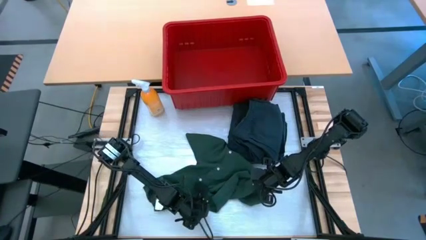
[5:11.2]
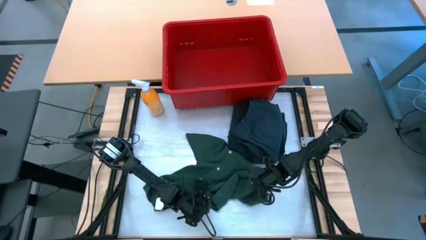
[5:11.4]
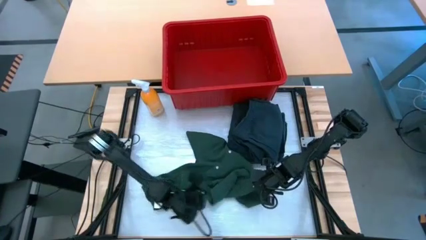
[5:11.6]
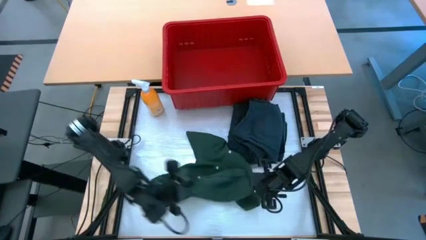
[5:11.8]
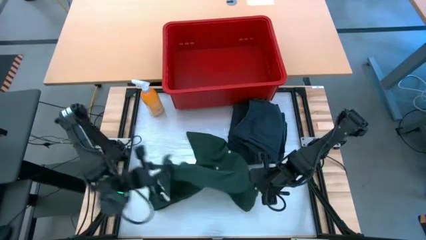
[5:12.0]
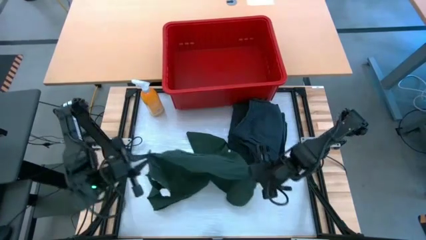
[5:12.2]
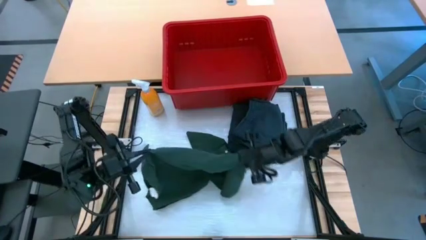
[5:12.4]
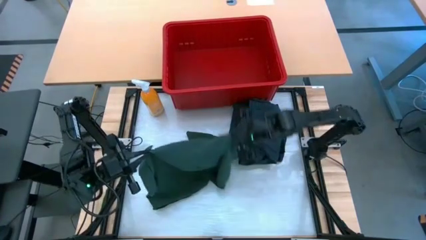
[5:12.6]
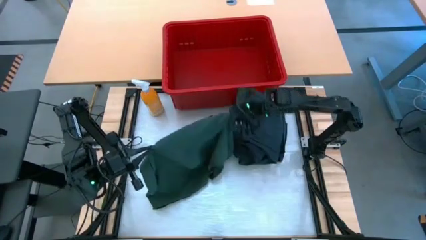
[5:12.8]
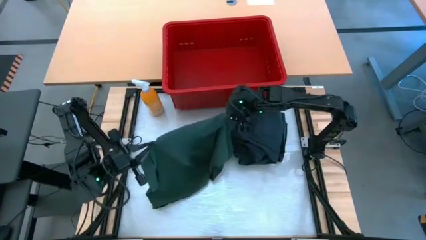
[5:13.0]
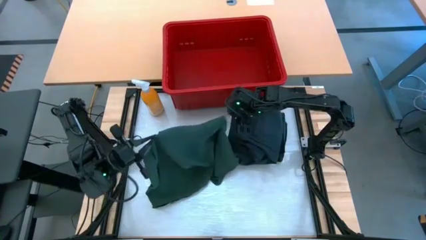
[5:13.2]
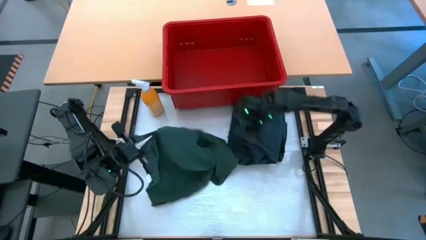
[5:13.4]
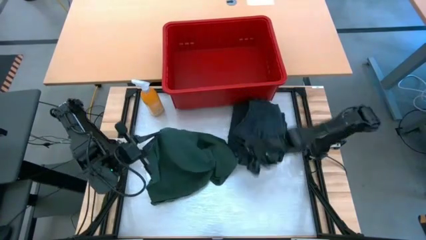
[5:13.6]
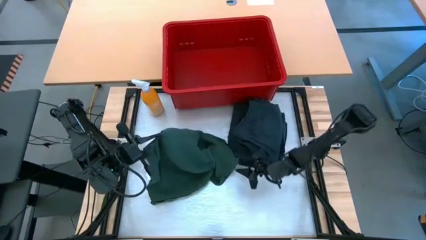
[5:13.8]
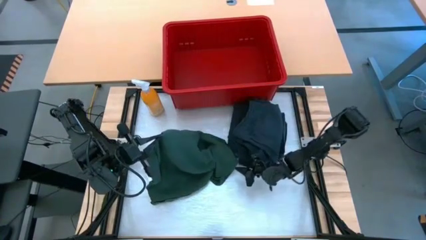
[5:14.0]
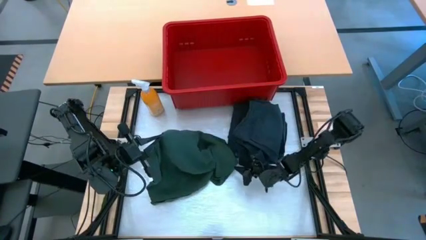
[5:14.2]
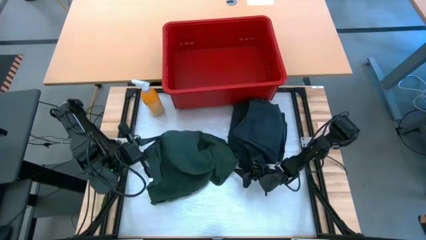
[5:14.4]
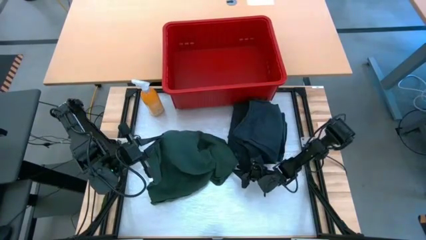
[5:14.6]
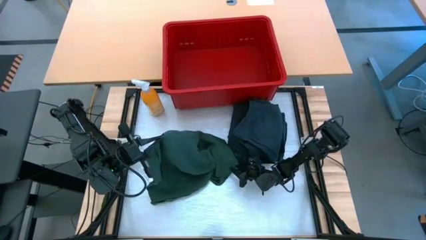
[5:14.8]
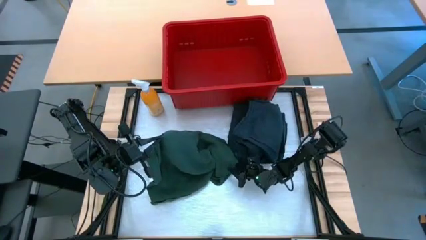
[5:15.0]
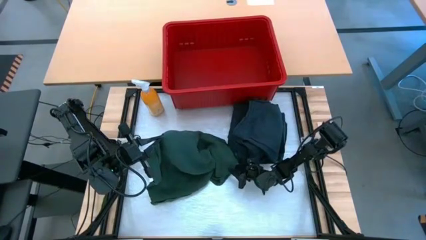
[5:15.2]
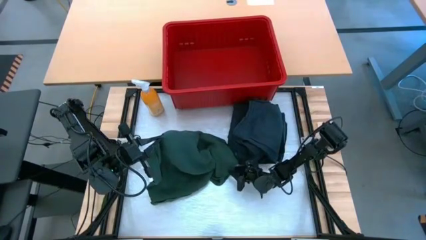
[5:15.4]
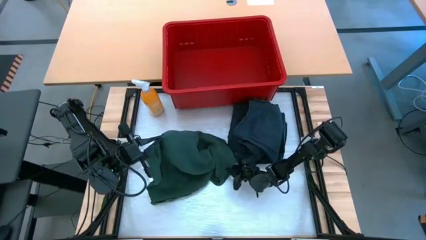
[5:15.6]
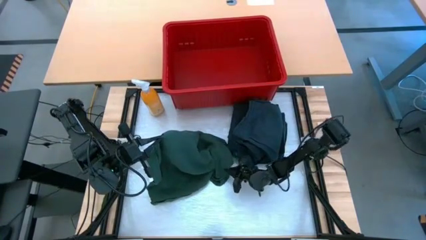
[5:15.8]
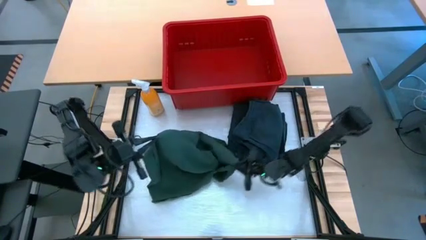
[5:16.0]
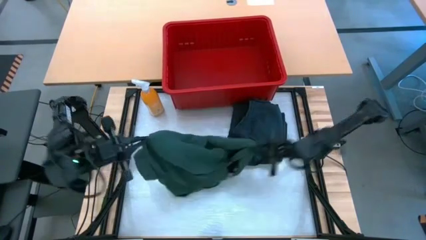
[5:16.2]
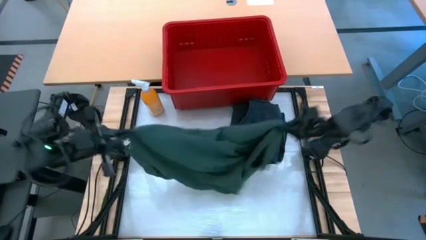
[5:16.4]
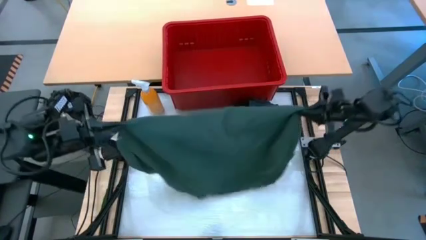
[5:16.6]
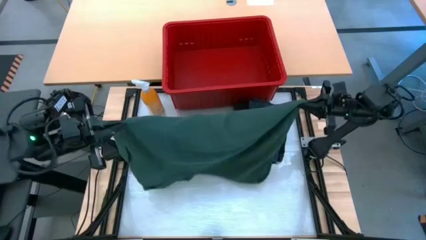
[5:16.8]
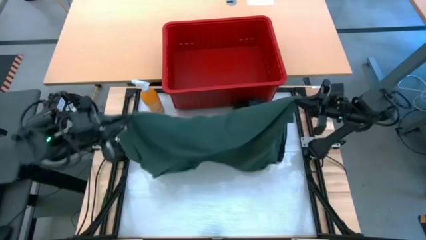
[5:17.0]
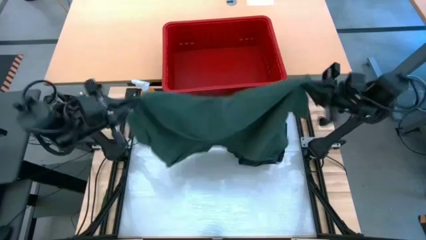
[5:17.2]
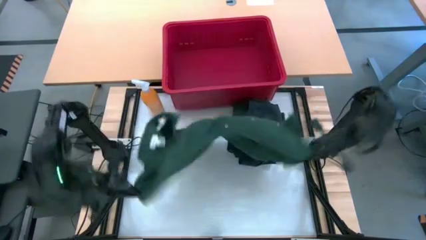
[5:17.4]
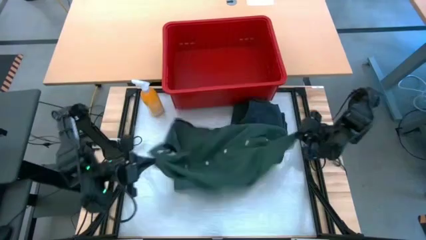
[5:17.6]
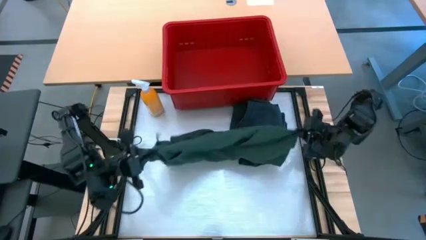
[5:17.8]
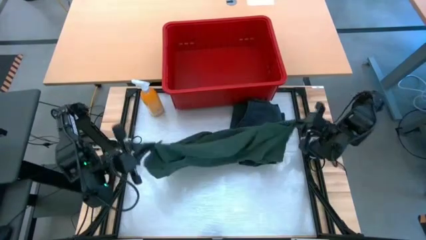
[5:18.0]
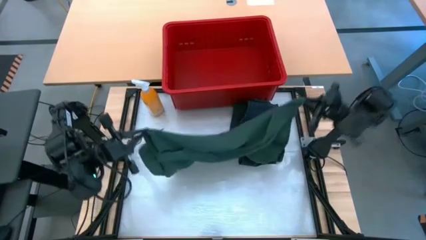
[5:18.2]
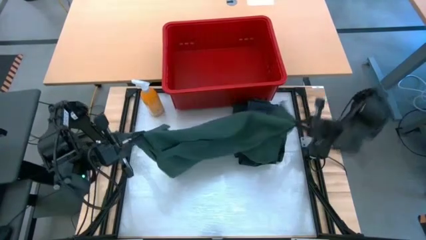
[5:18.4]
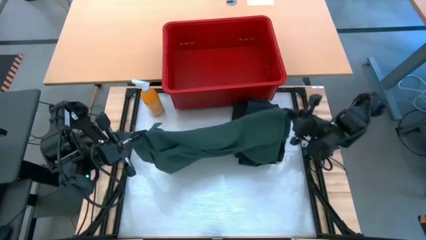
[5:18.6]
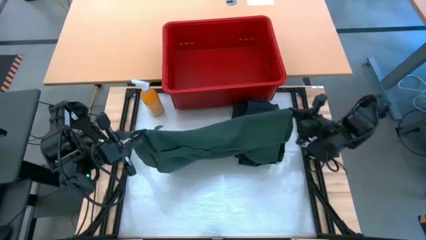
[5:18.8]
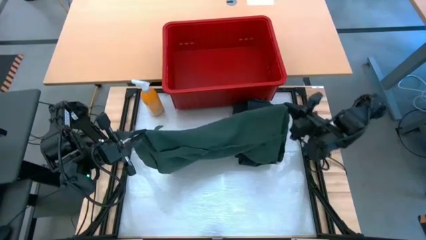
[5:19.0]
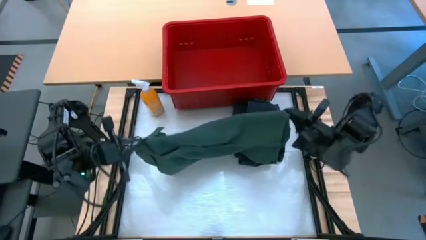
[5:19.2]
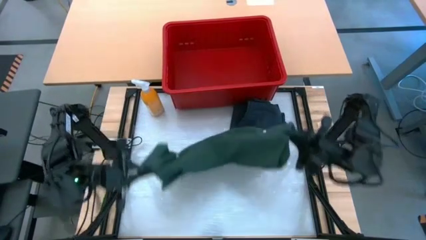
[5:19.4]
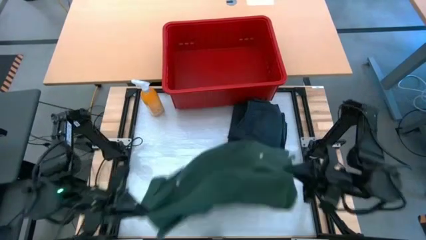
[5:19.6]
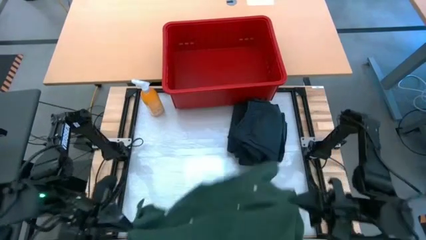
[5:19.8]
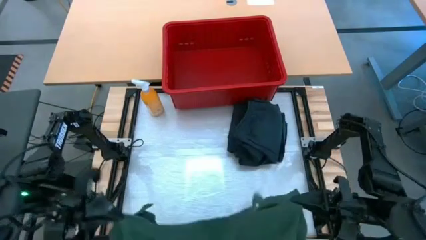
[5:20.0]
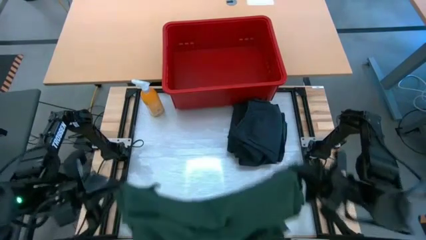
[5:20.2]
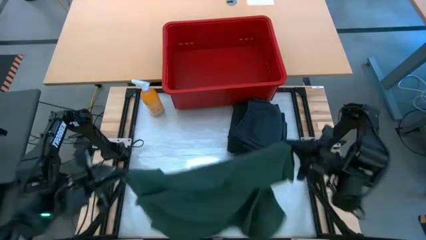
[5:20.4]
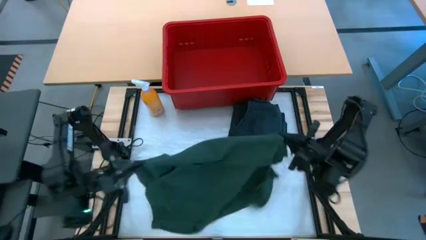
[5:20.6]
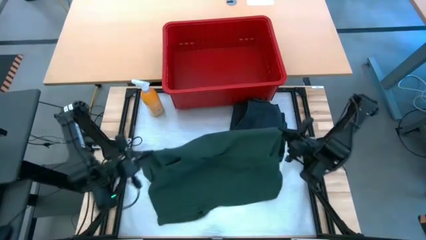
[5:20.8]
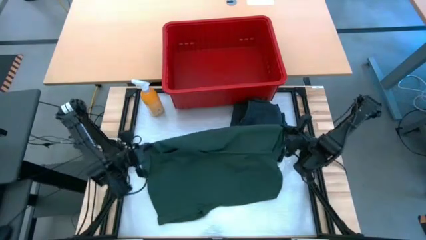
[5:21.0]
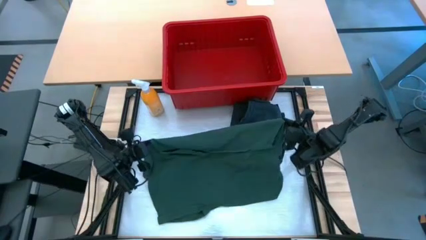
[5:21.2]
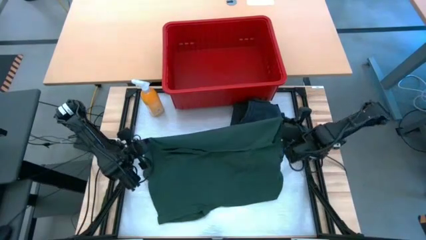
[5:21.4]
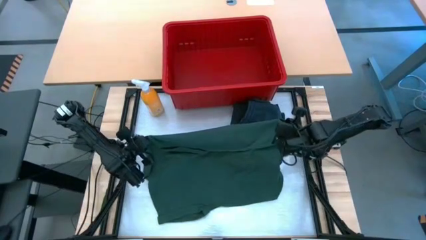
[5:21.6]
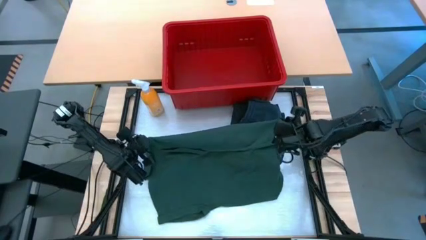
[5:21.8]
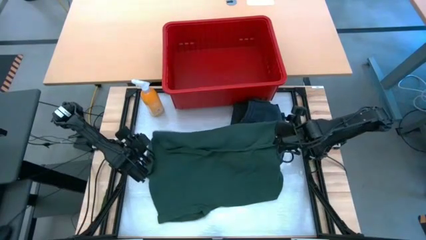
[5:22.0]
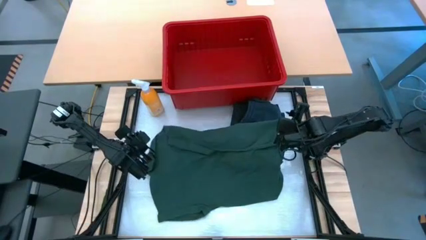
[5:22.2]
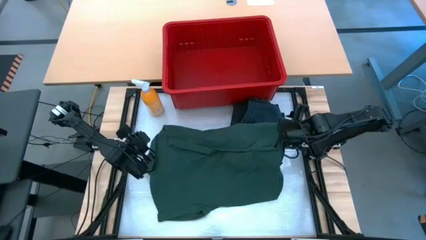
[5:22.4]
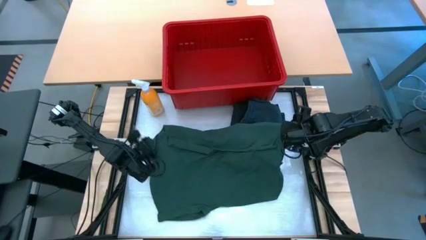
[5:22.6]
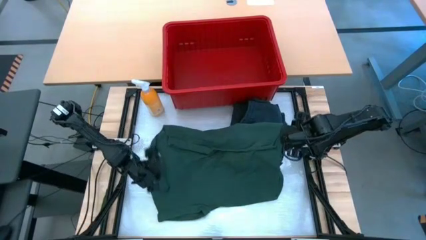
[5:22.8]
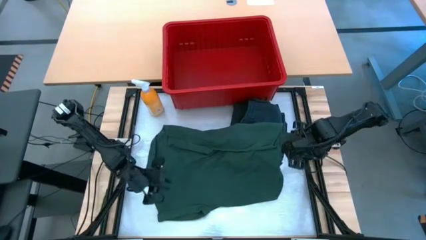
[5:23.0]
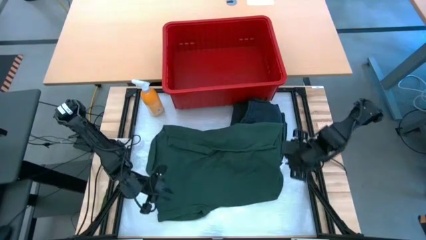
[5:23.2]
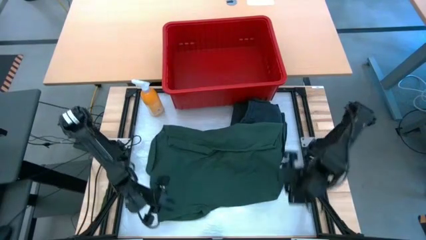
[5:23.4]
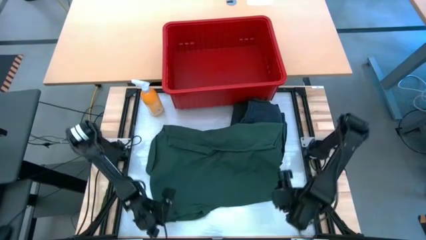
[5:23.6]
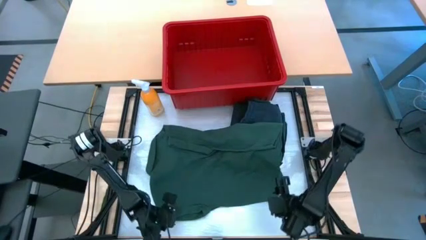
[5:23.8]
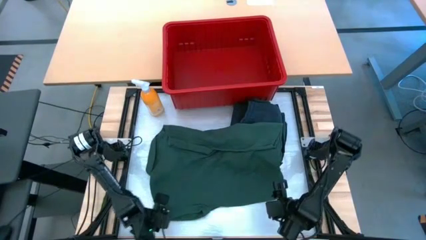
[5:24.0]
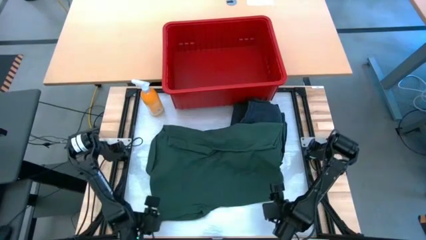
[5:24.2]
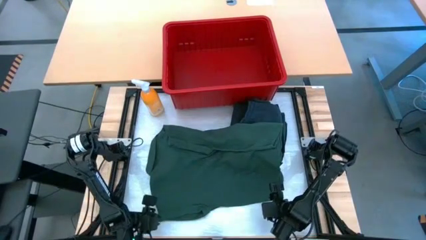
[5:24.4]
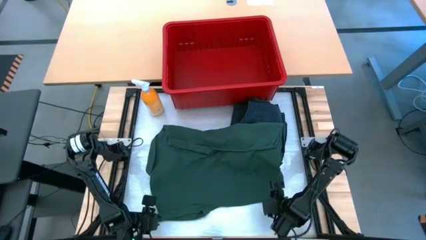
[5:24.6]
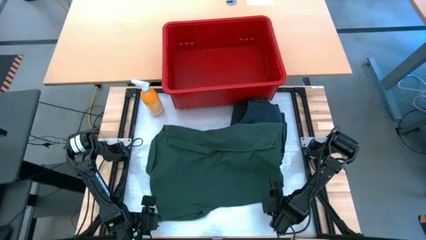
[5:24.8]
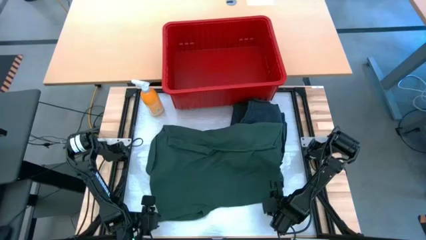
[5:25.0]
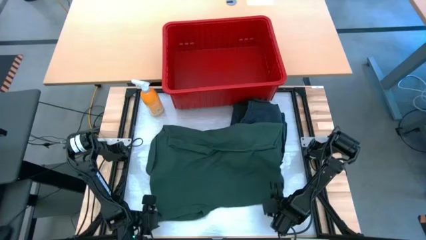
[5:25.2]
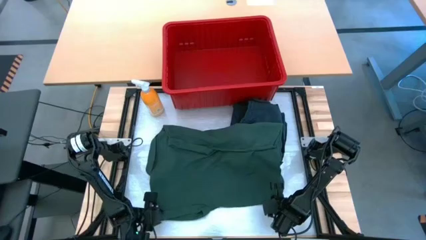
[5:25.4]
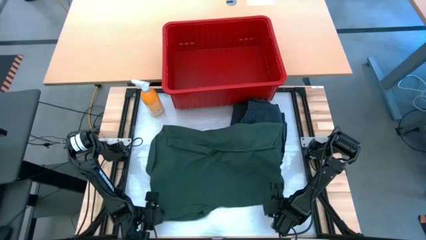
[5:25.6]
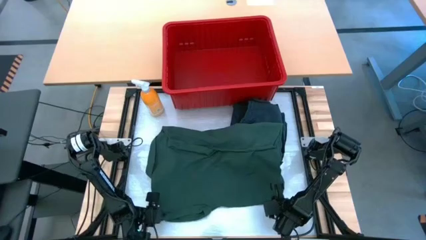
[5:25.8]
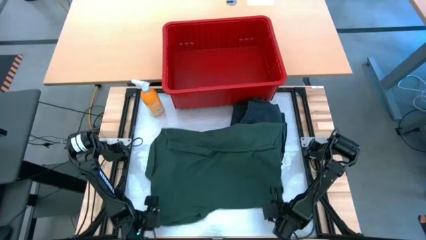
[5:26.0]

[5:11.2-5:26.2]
Task: Fold Laundry from Bin
Fold the green button down shirt
